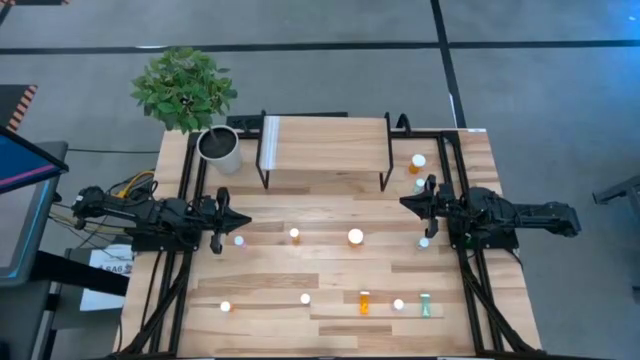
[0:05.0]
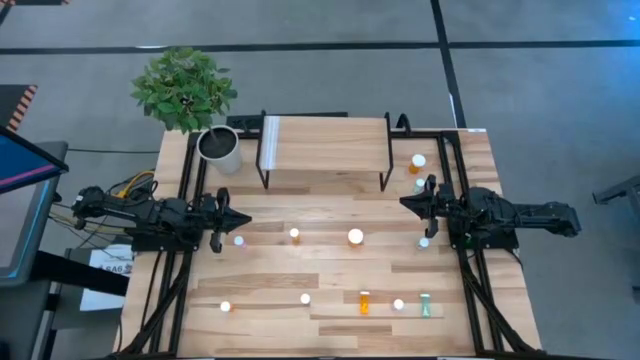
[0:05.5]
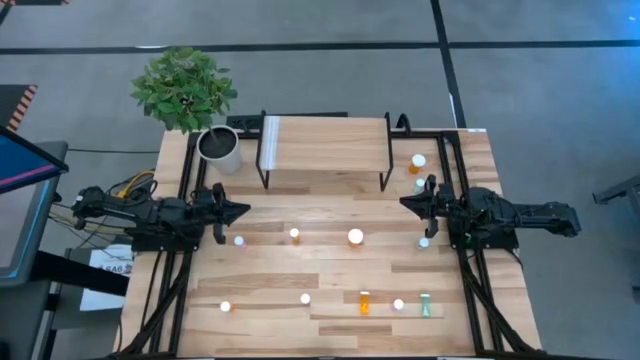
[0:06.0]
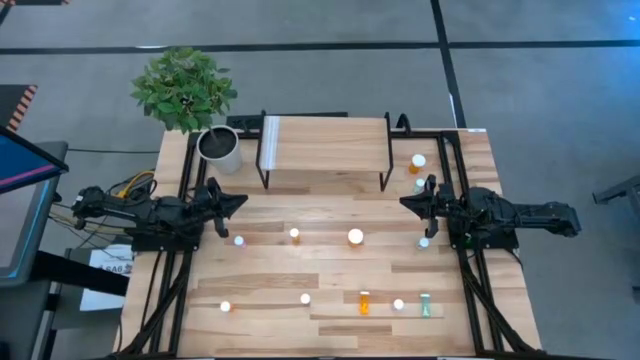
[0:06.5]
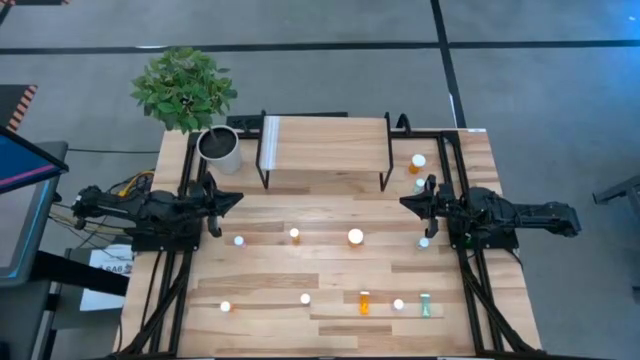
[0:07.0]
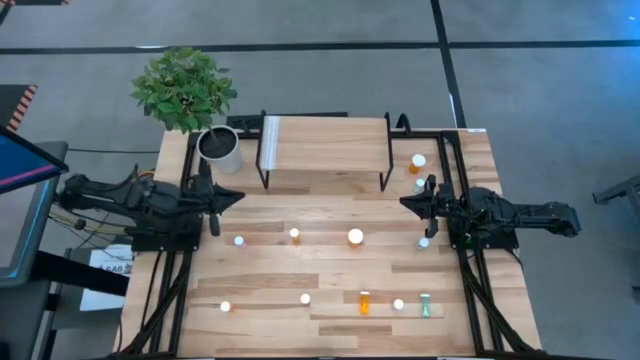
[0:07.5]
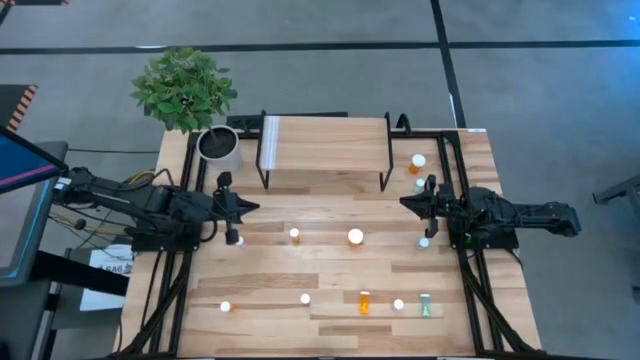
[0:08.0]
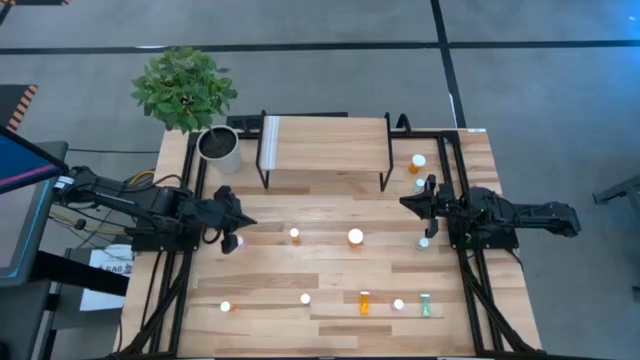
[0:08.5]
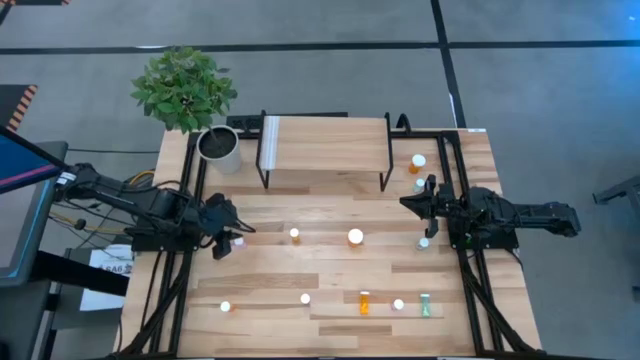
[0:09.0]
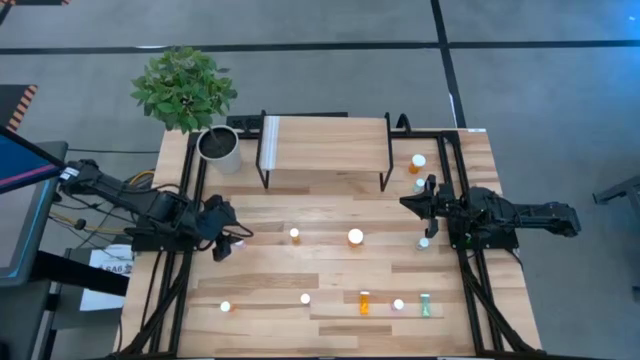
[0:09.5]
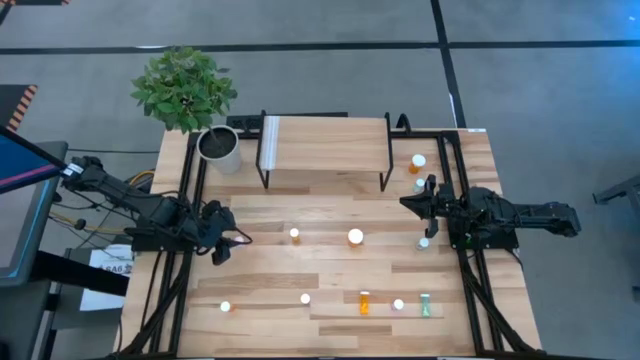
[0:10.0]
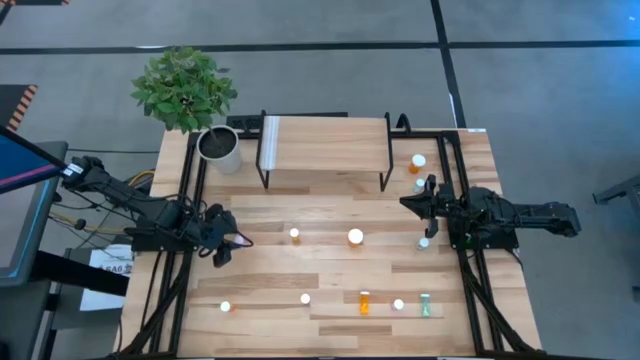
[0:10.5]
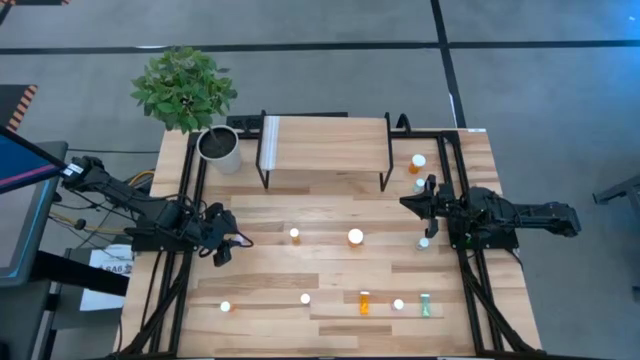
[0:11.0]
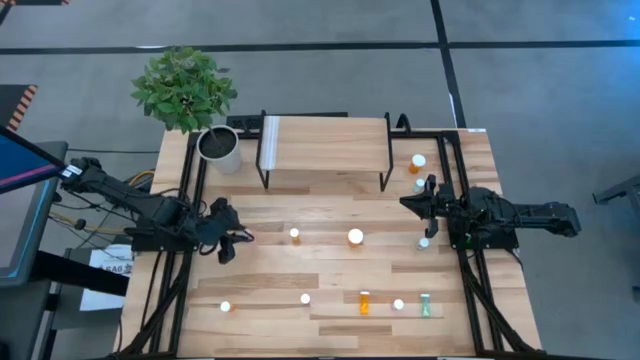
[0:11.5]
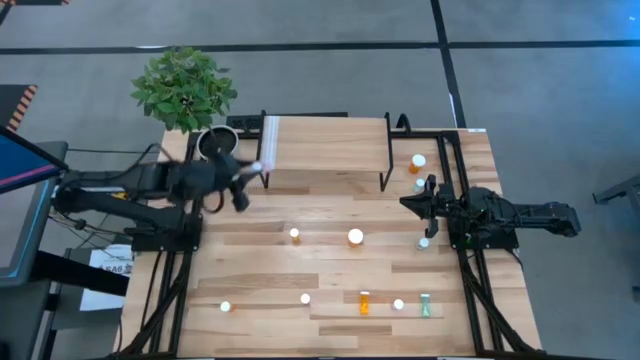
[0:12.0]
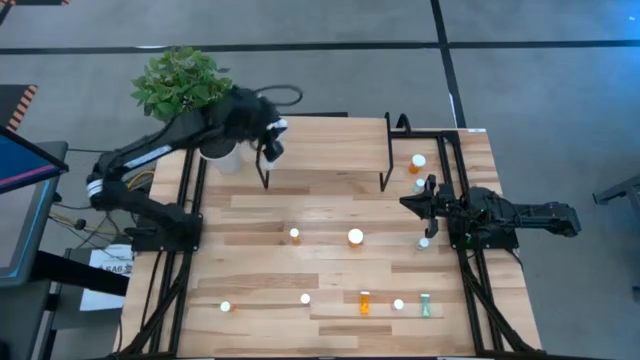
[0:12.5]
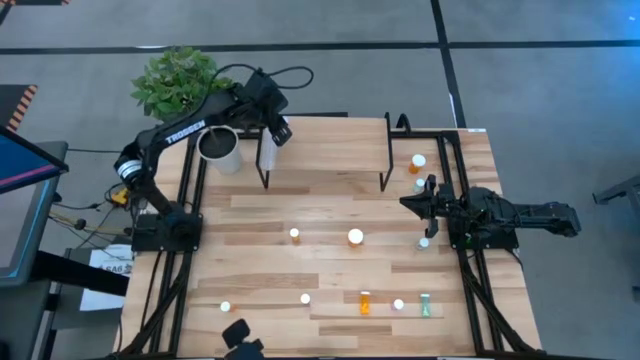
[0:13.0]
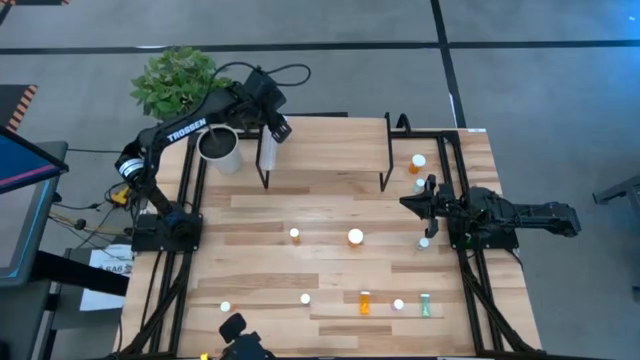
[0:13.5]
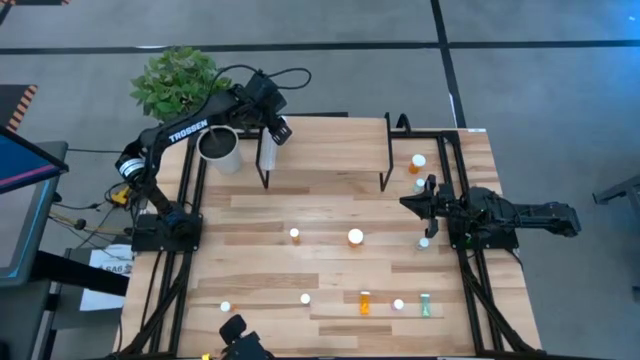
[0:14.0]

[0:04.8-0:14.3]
Task: Pick and place medicine bottles onto shelf by color
Put the top pink pill bottle on the shelf

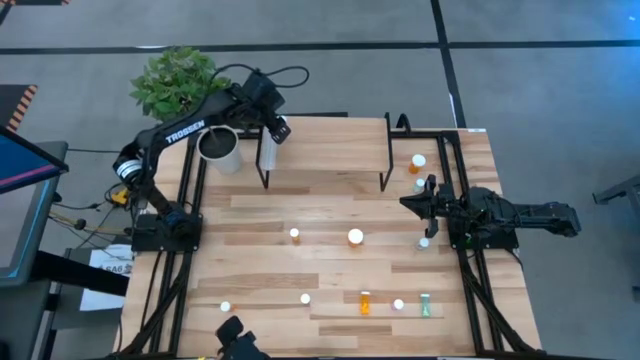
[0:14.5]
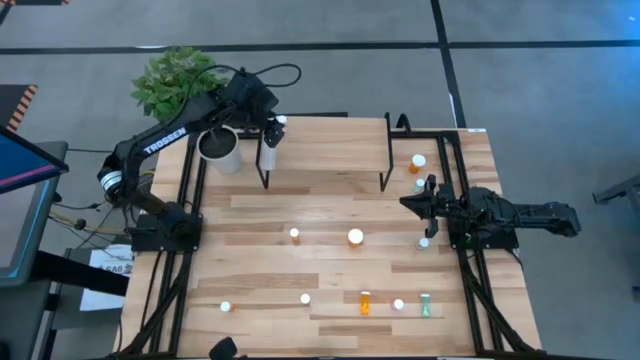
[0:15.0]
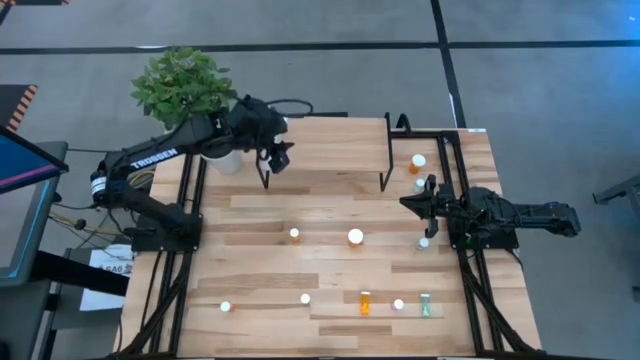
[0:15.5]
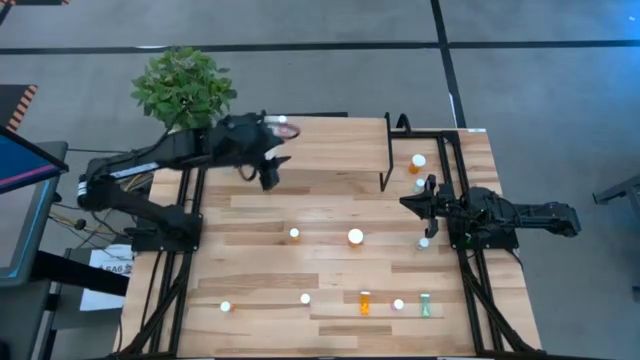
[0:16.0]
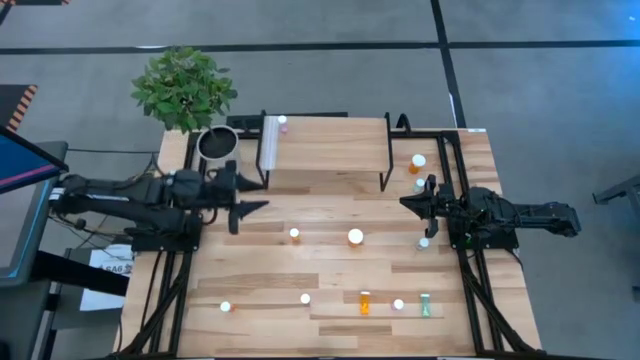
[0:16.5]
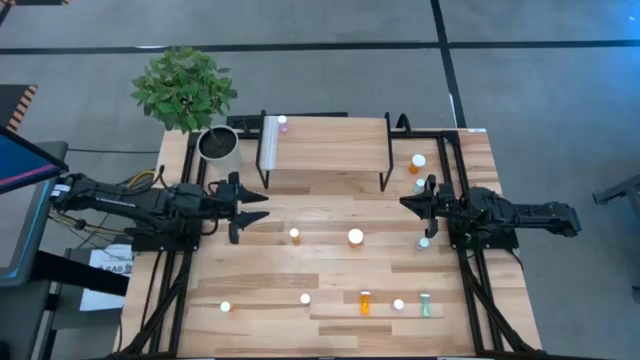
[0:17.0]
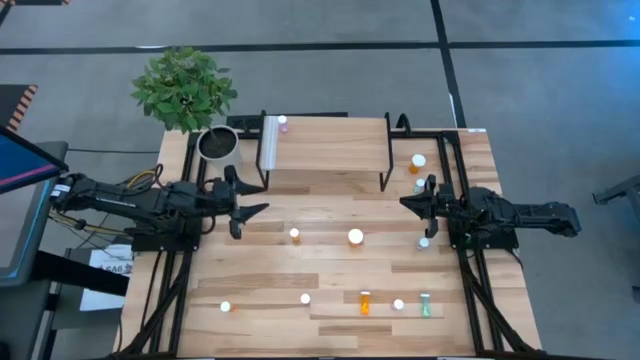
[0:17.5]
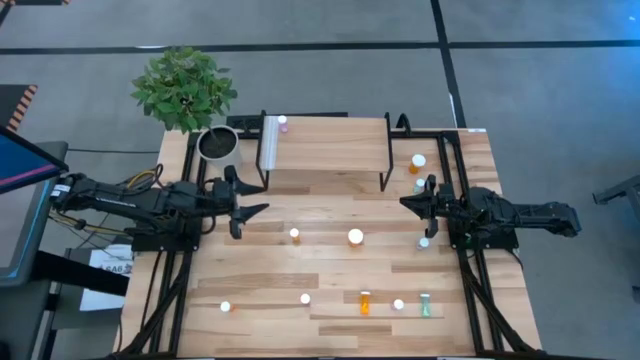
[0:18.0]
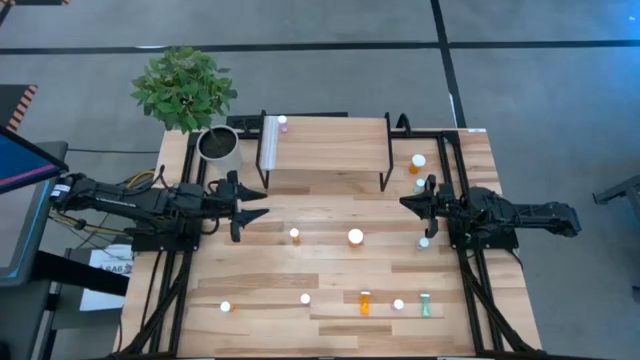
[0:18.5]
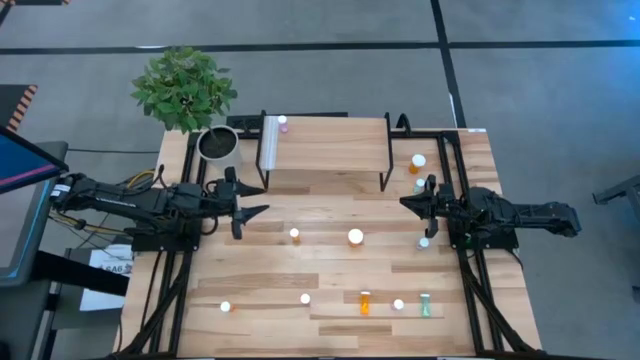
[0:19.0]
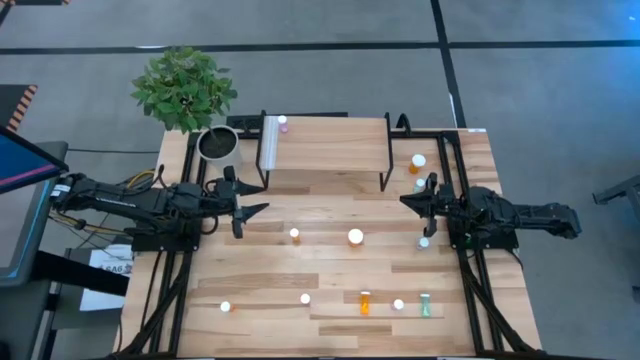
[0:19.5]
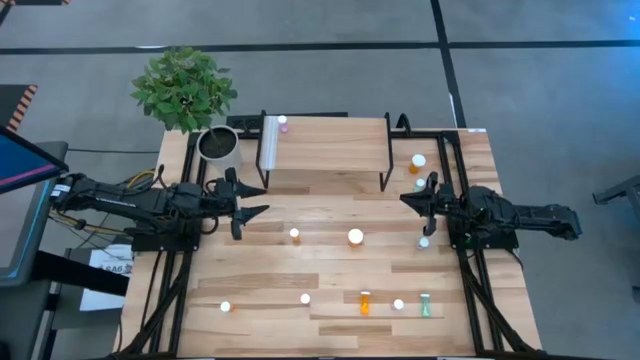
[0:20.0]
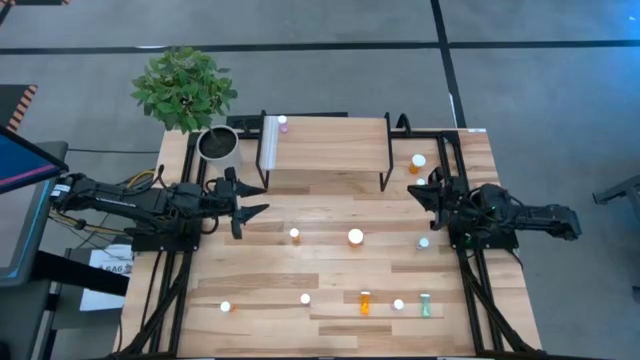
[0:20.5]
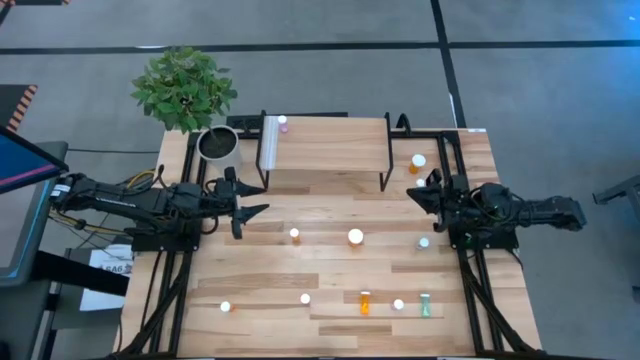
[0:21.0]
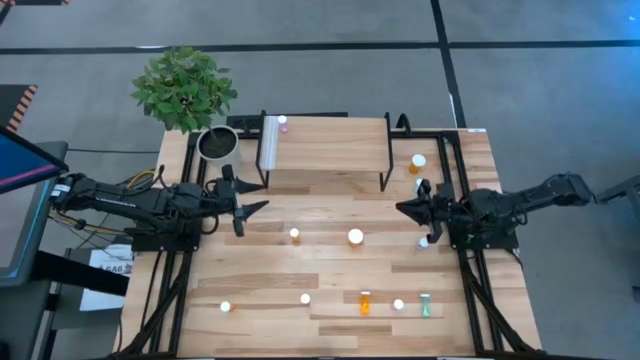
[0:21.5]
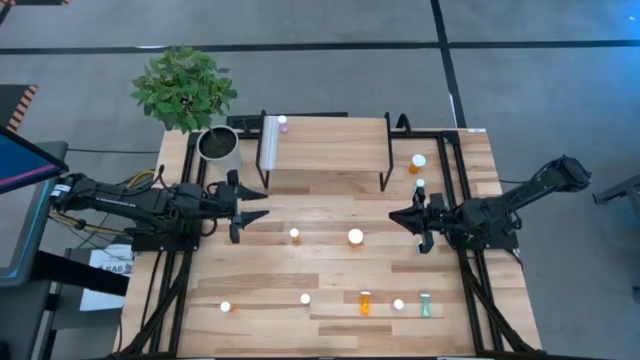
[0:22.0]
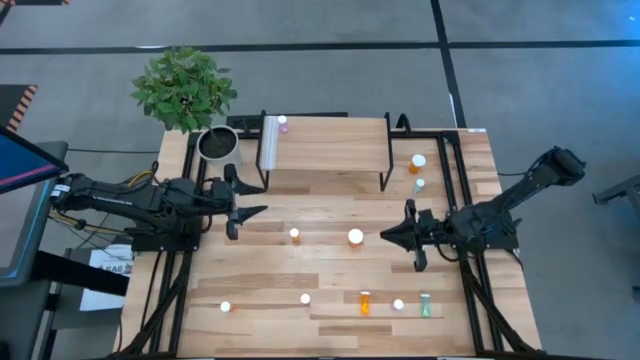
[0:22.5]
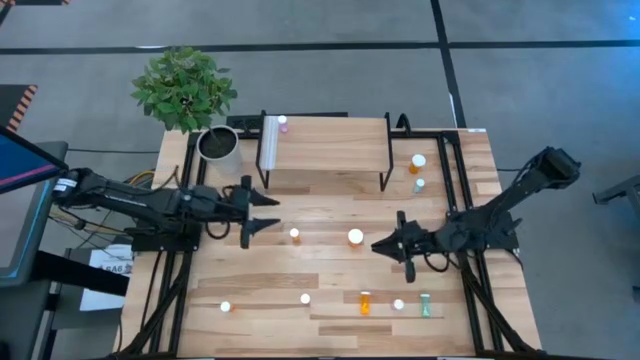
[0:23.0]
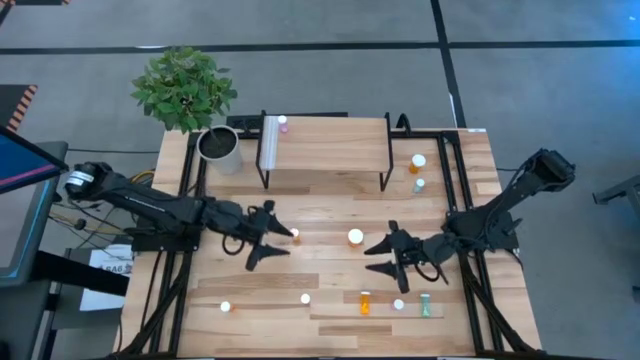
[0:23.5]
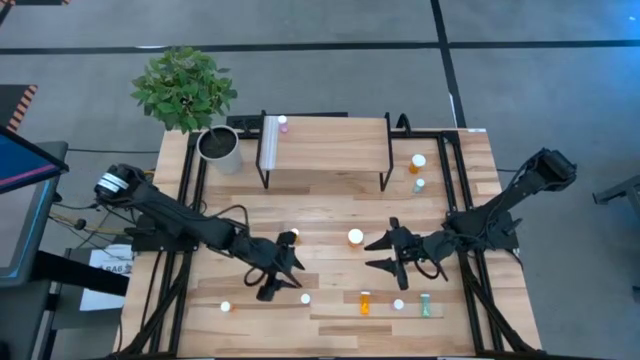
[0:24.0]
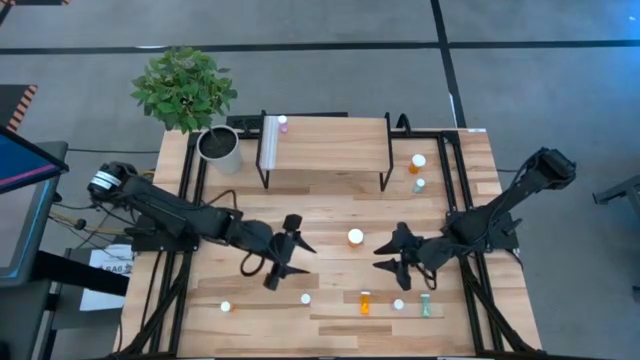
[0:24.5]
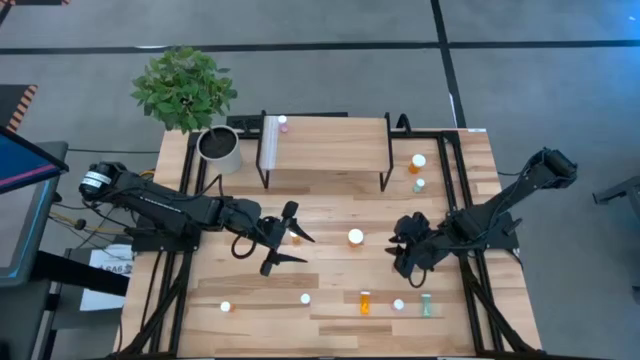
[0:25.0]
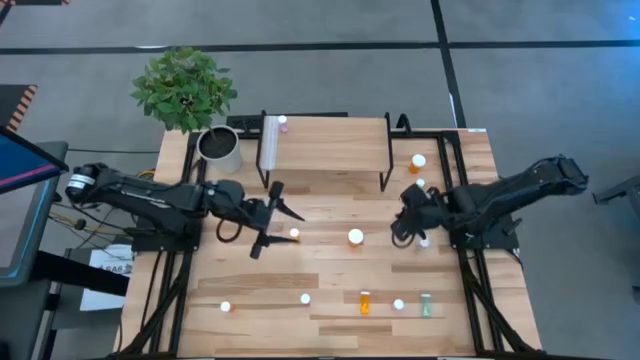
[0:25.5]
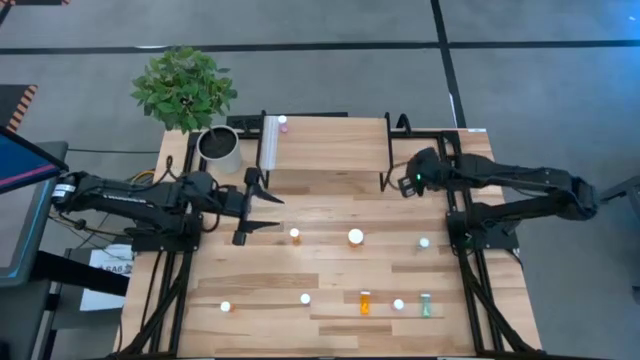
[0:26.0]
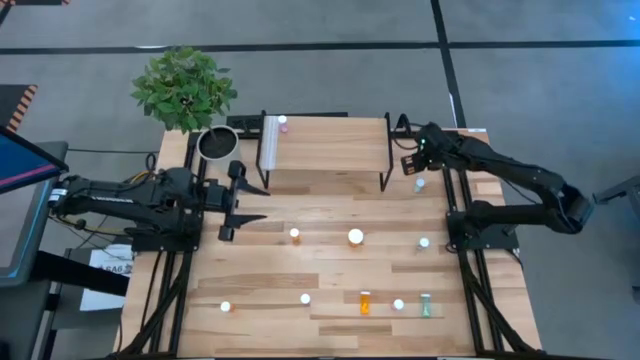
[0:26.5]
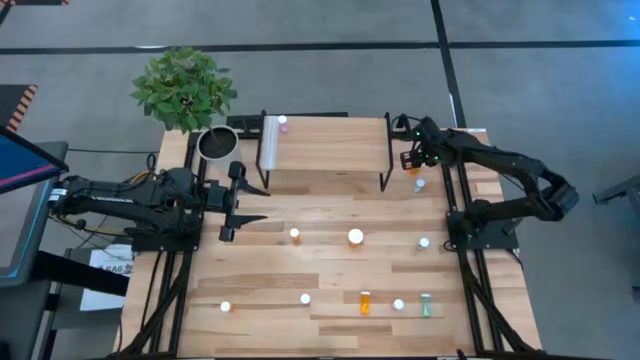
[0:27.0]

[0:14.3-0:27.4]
Put the top large orange pill bottle on the shelf
